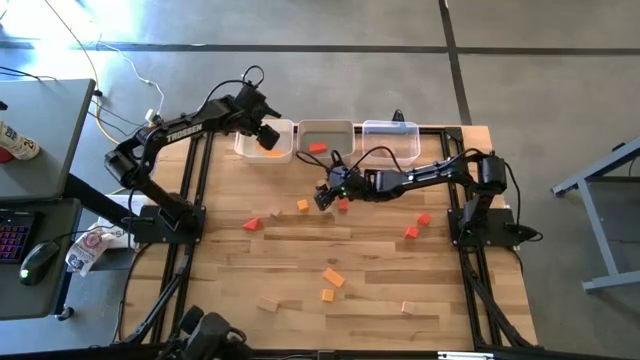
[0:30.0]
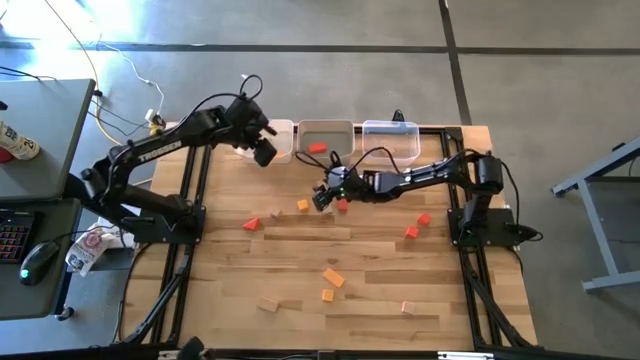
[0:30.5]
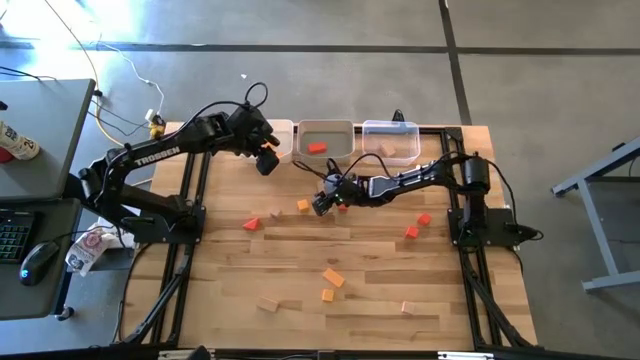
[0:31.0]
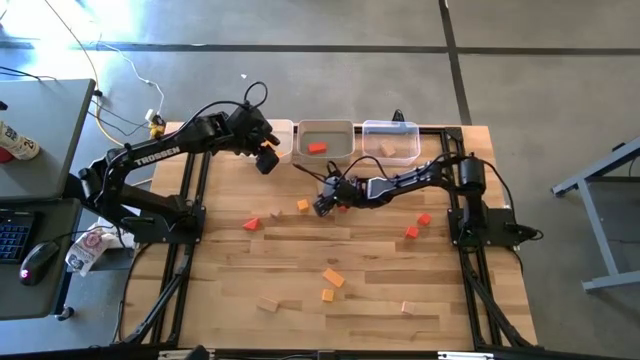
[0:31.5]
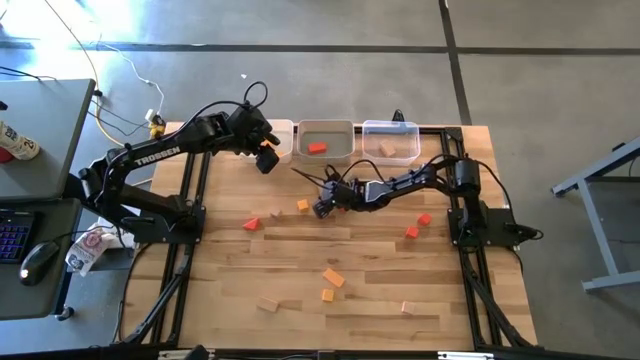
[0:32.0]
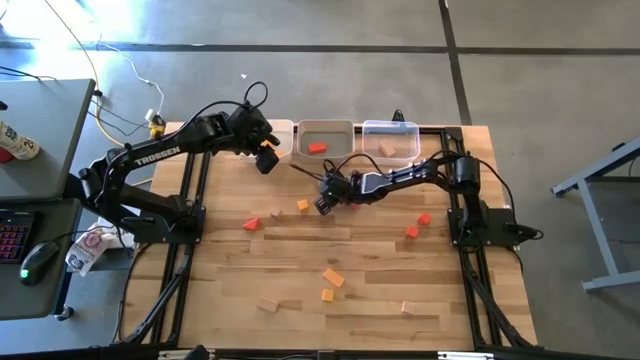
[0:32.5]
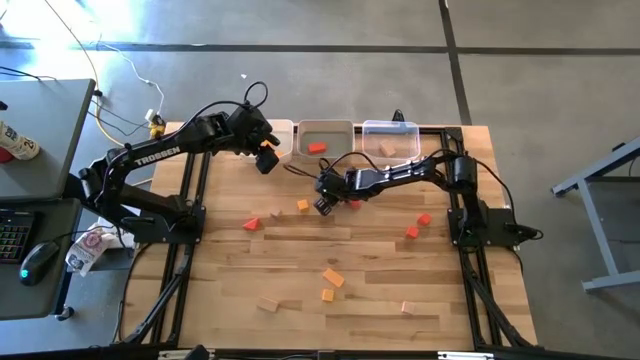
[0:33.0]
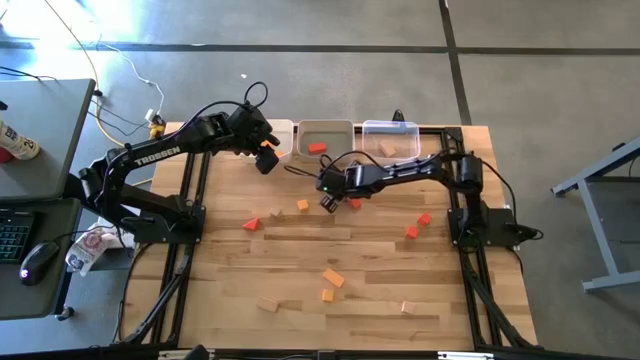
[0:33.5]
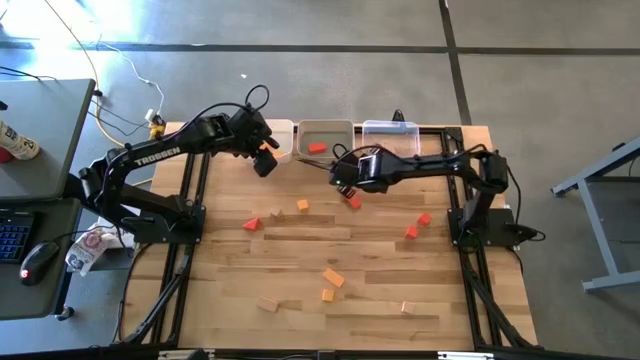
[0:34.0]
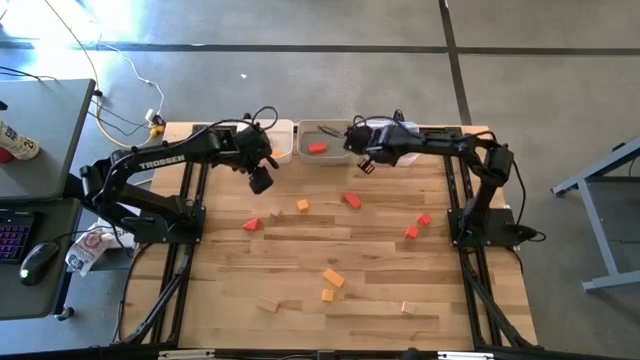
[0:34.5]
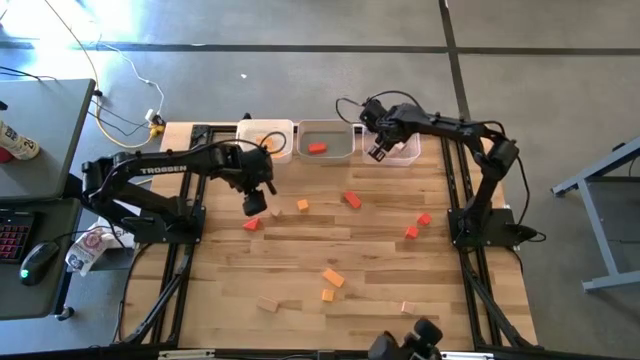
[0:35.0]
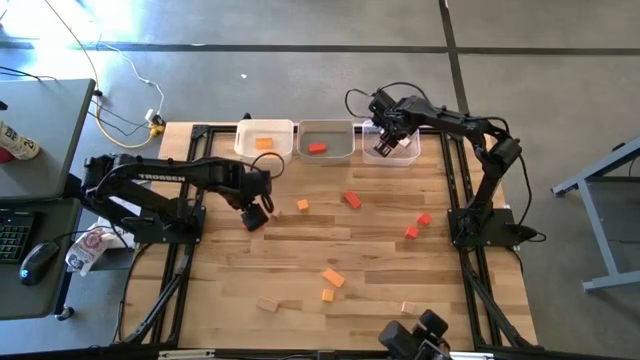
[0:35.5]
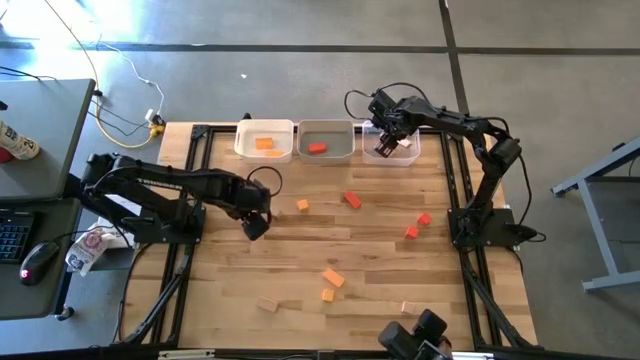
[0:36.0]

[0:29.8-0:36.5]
Task: Sort & place blocks by color
Put the brown block into the transparent bin

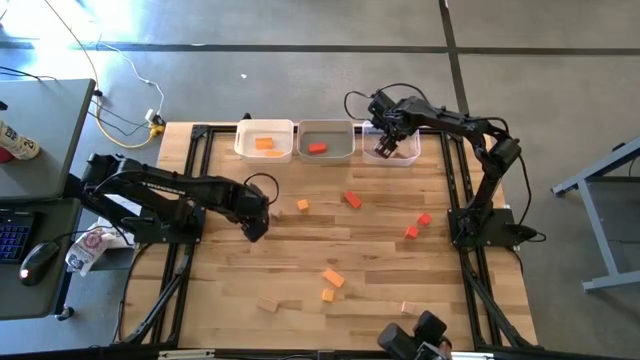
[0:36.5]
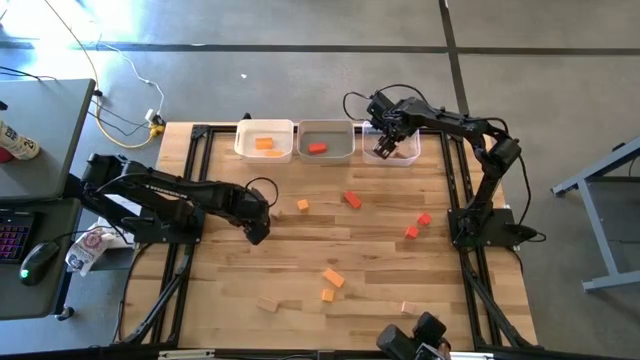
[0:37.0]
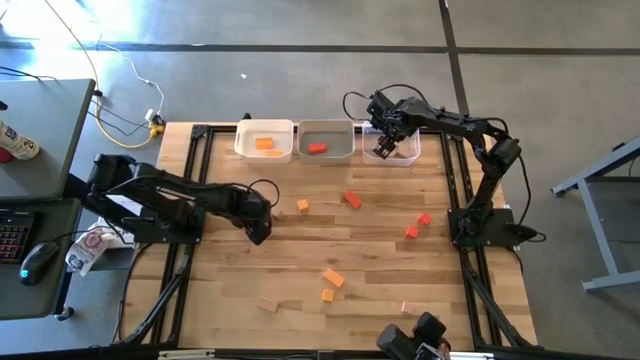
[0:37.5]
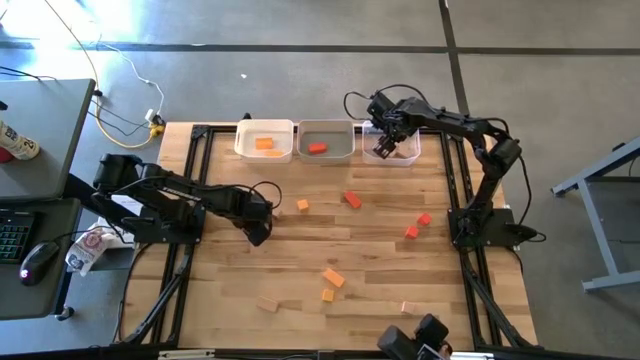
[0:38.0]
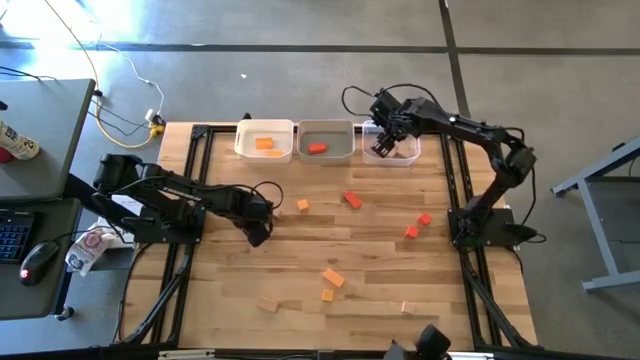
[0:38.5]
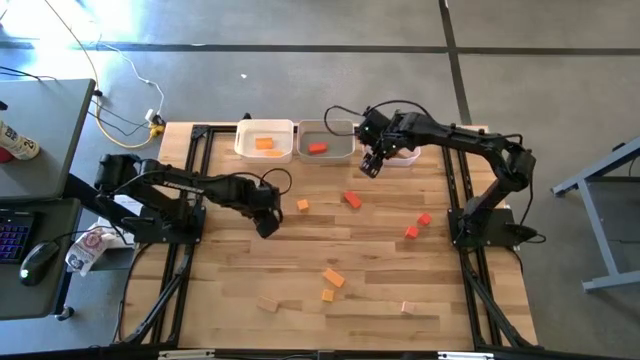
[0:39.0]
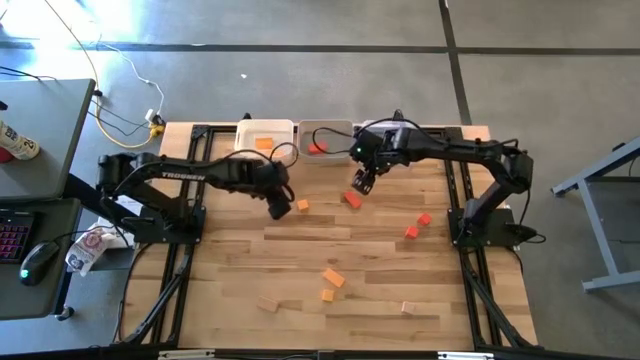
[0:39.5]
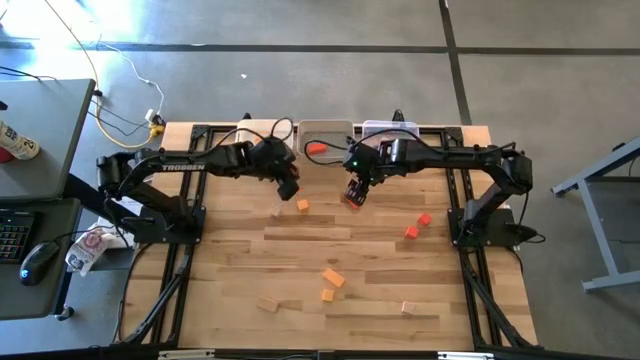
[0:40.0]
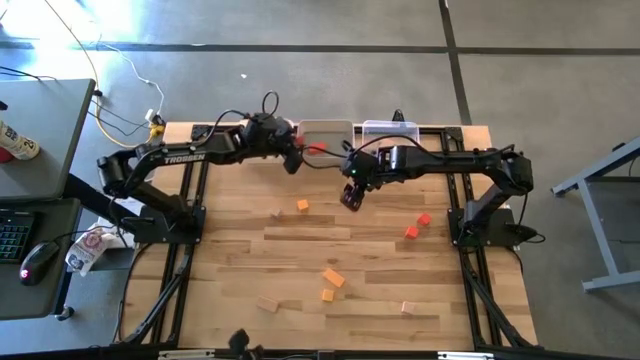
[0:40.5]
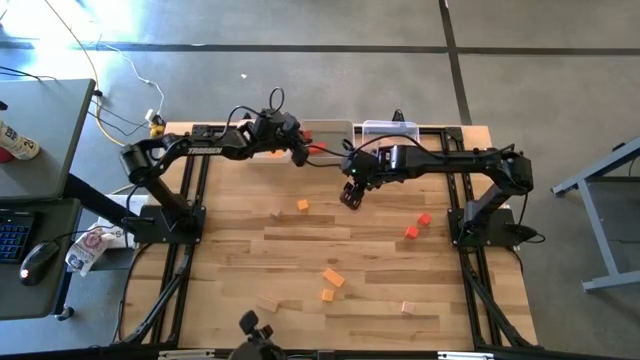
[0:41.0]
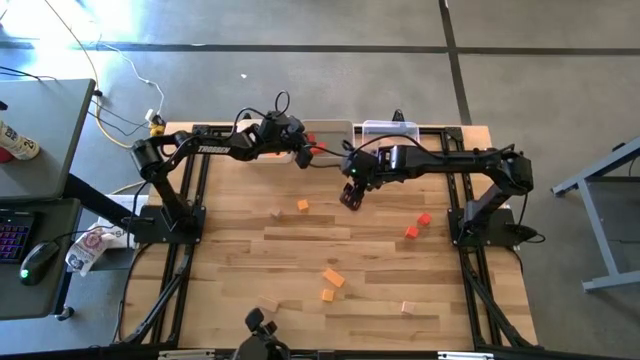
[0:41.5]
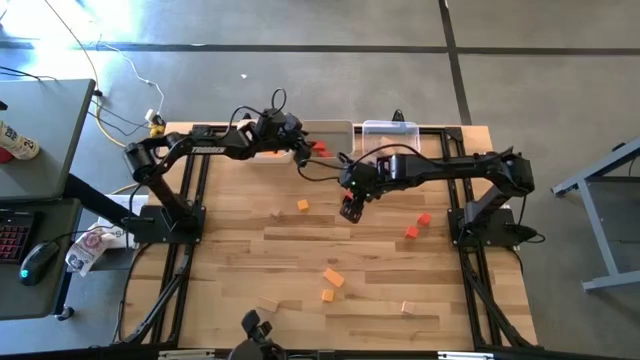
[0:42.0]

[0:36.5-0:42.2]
Put the orange block into the gray bin

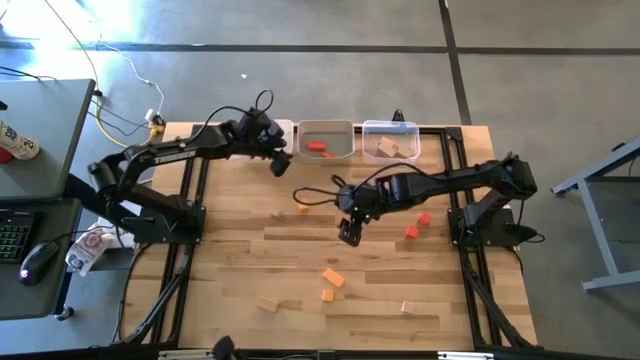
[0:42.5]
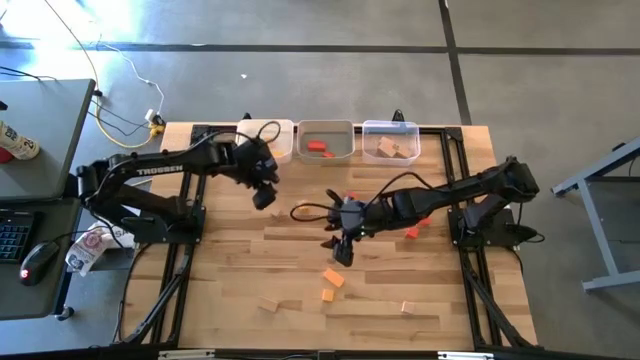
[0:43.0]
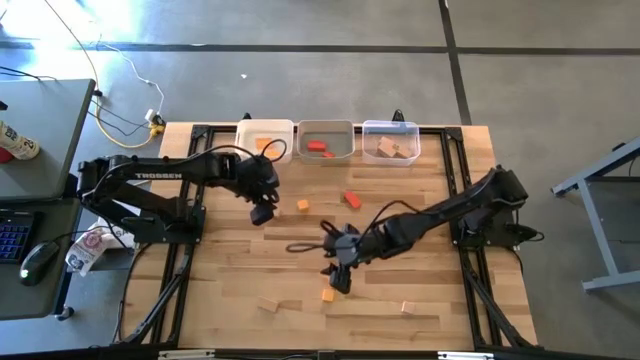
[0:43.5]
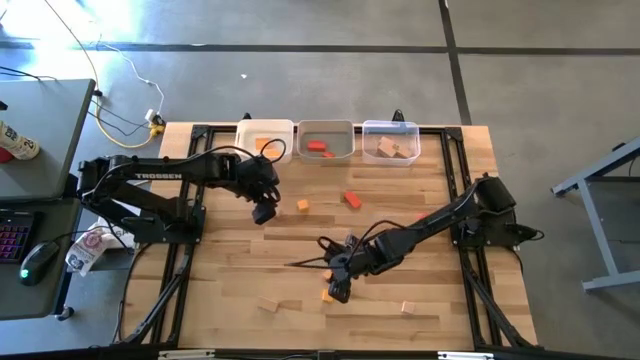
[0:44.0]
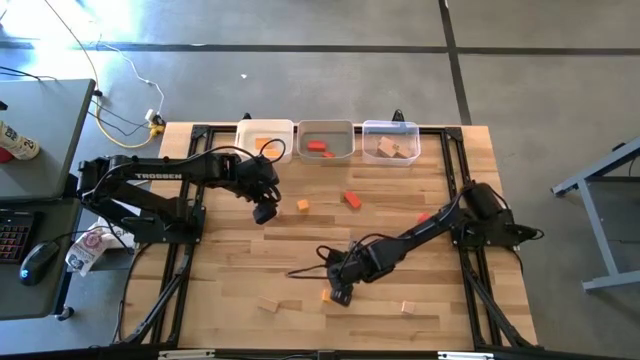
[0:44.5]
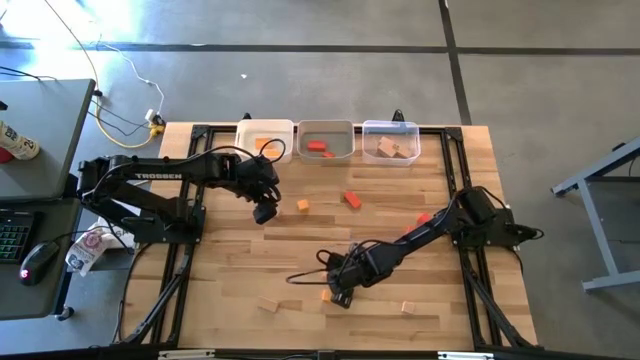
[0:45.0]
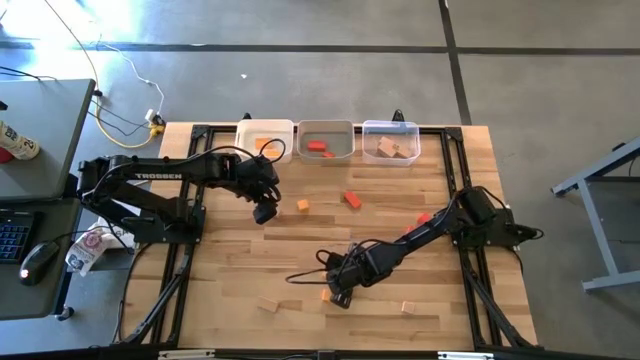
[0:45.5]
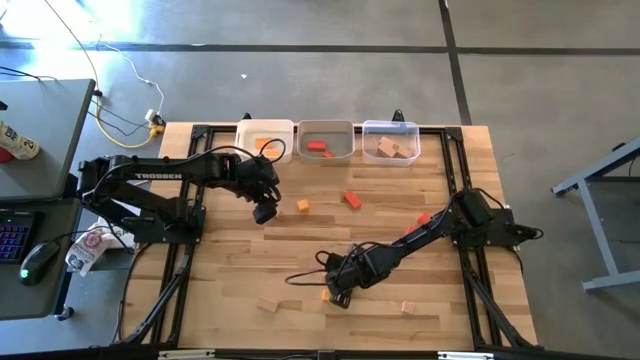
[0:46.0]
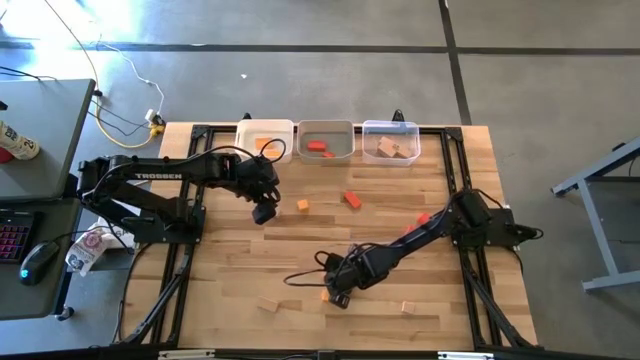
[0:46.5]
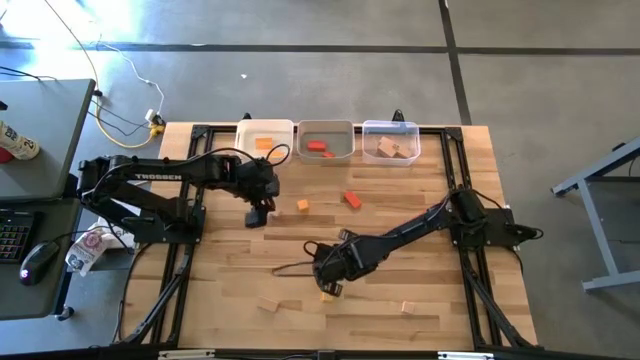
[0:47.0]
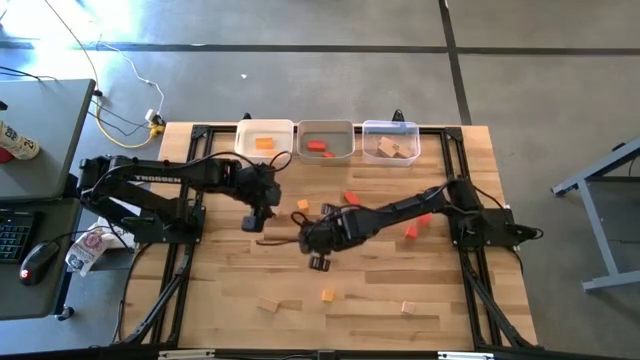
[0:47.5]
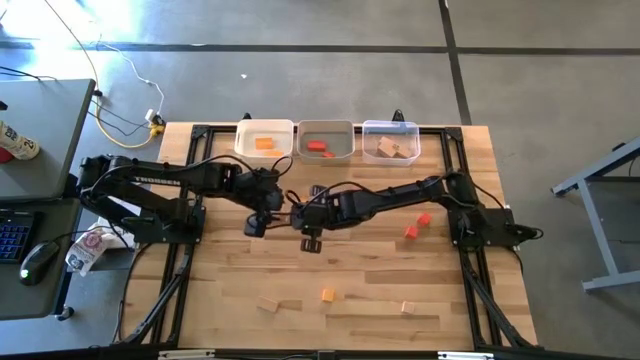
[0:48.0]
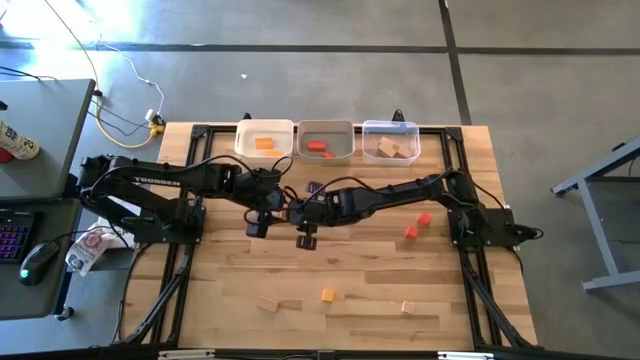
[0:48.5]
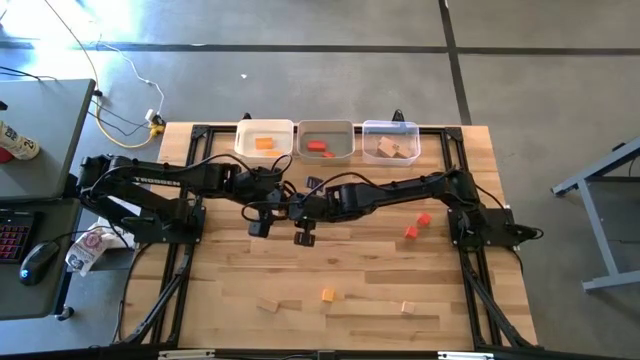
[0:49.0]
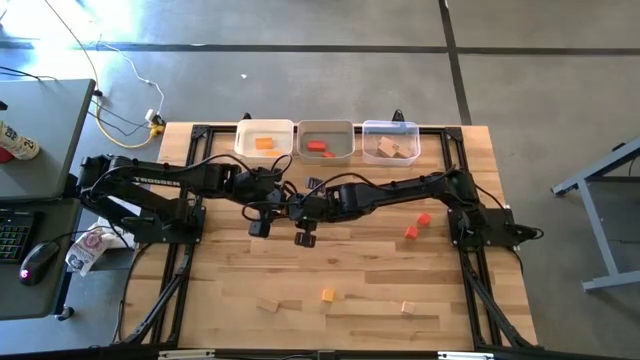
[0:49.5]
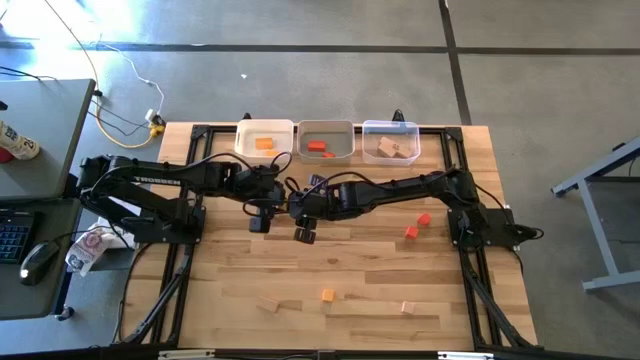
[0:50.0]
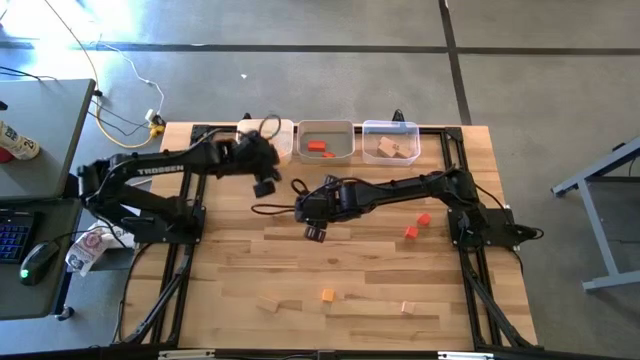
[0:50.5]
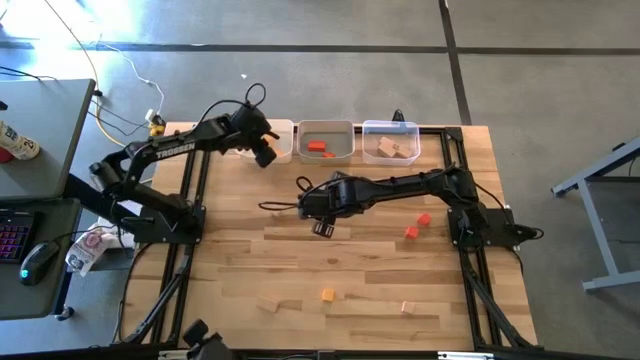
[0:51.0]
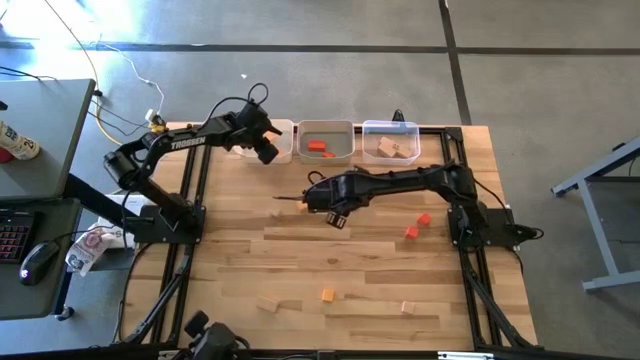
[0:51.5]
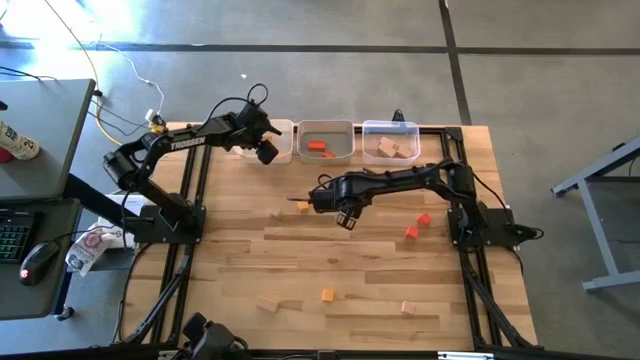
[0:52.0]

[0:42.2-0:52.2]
Put the yellow block into the white bin

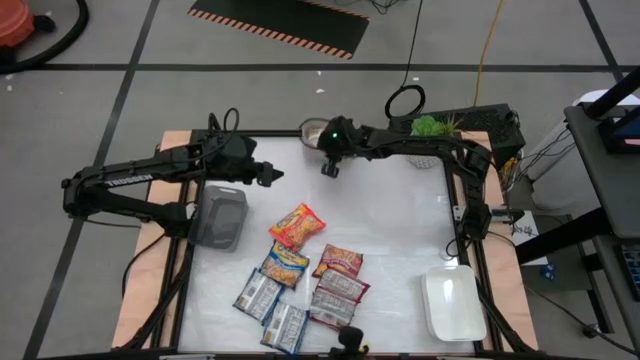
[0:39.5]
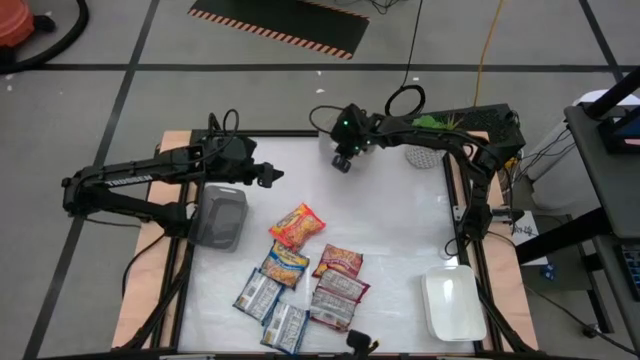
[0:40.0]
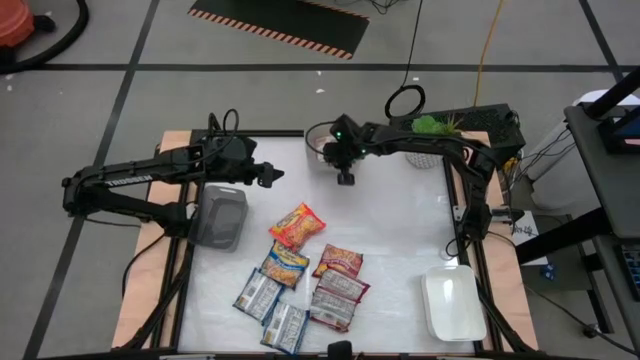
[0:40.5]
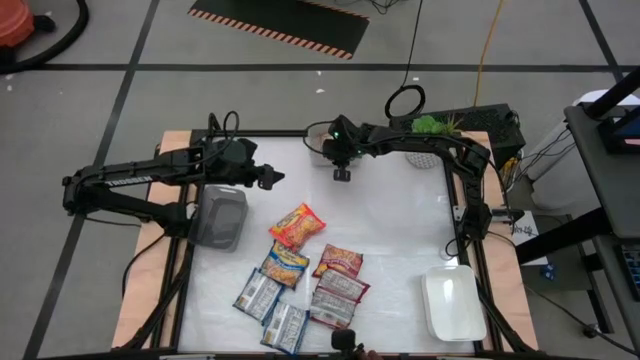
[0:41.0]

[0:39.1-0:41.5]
Task: Sort Maruchan noodles
Adjust the gray bin on the table
